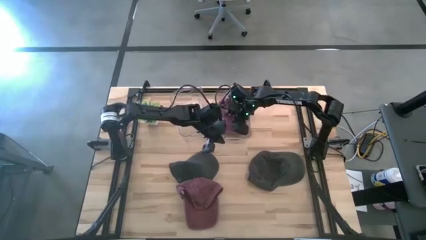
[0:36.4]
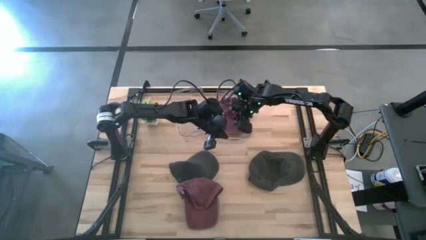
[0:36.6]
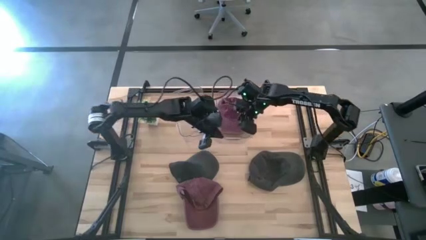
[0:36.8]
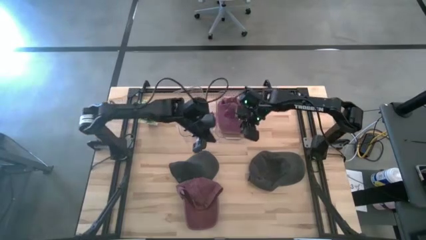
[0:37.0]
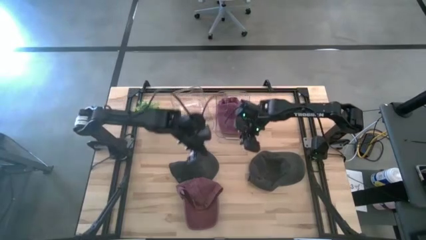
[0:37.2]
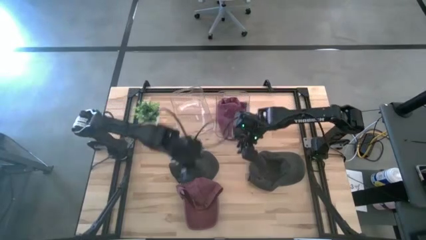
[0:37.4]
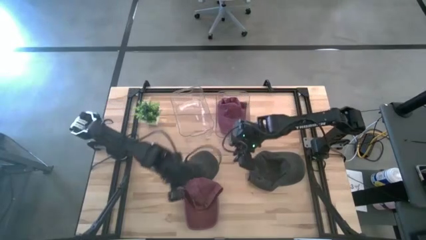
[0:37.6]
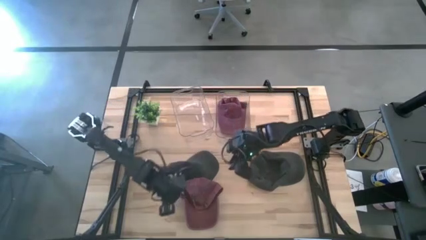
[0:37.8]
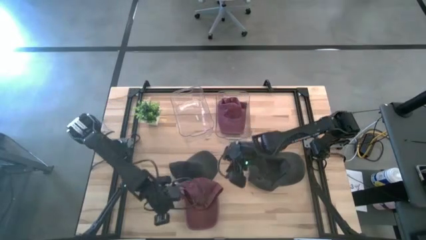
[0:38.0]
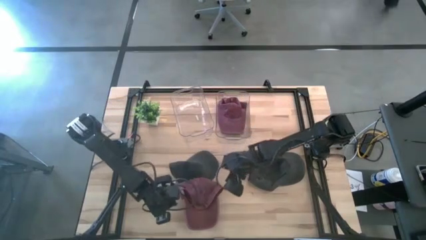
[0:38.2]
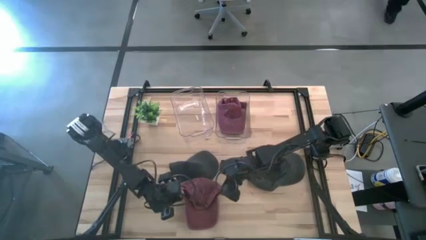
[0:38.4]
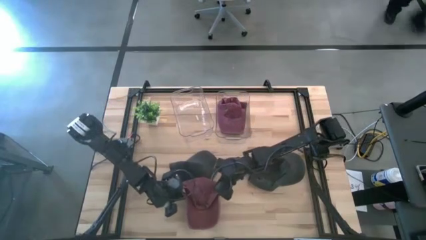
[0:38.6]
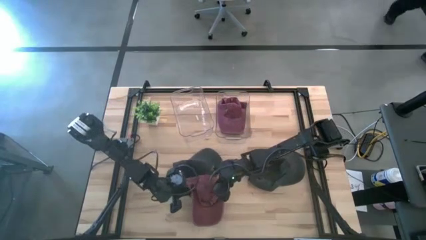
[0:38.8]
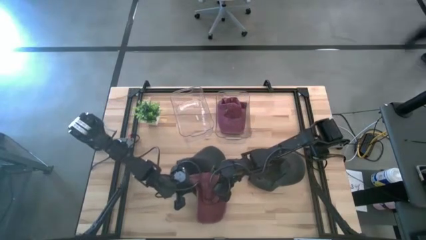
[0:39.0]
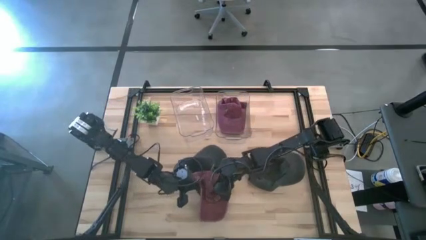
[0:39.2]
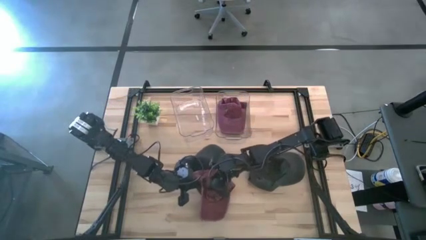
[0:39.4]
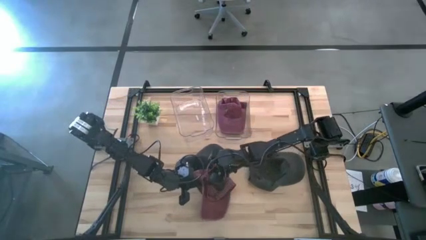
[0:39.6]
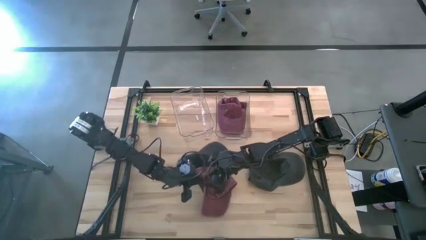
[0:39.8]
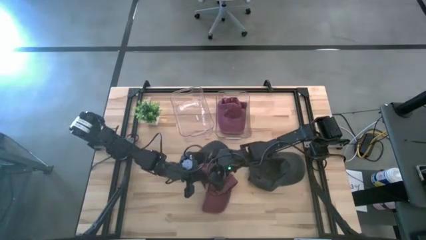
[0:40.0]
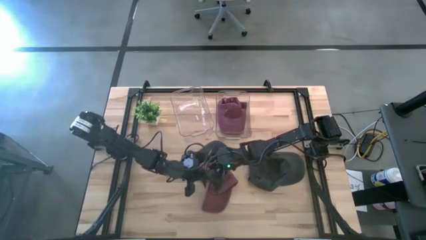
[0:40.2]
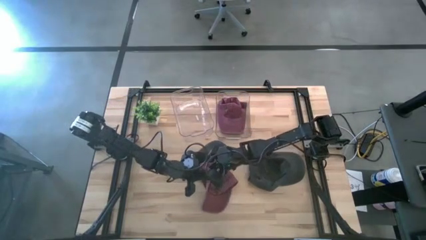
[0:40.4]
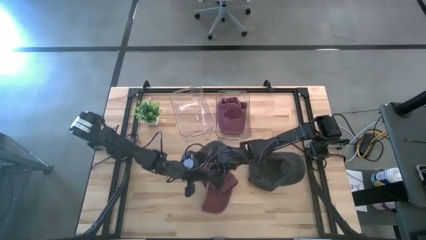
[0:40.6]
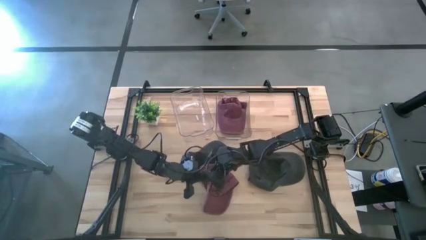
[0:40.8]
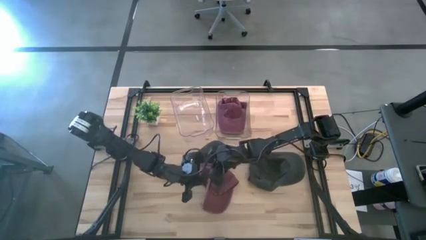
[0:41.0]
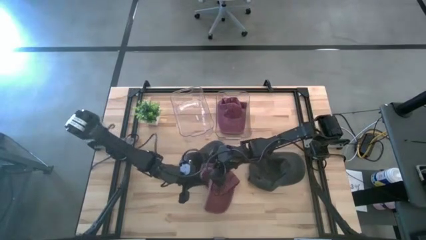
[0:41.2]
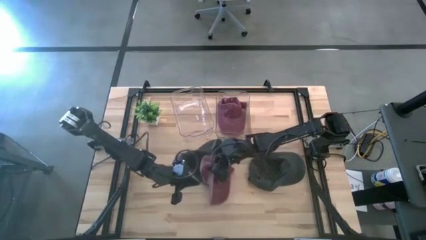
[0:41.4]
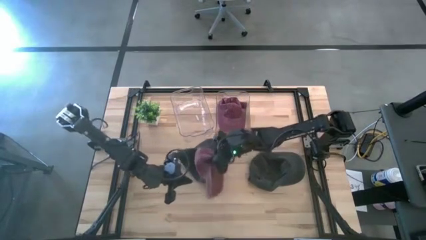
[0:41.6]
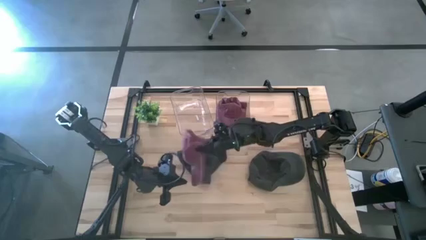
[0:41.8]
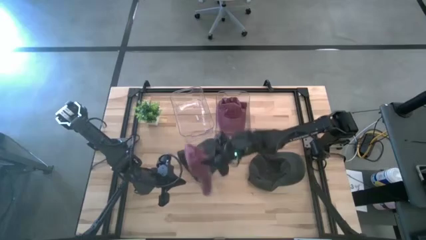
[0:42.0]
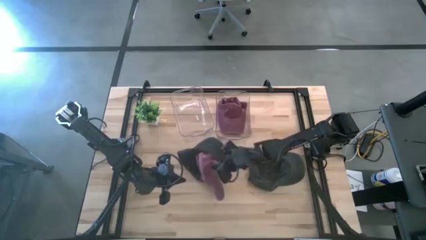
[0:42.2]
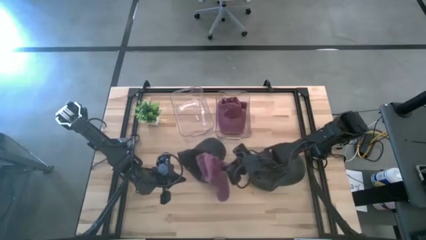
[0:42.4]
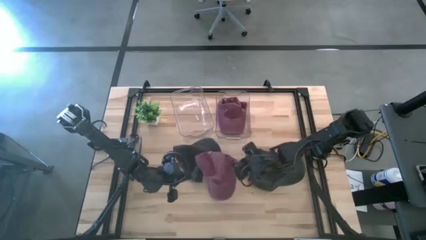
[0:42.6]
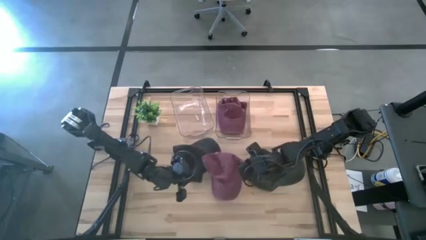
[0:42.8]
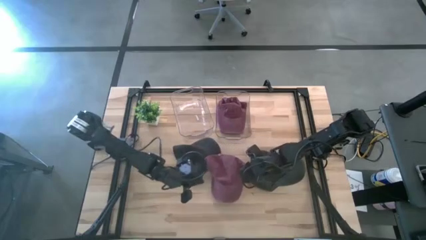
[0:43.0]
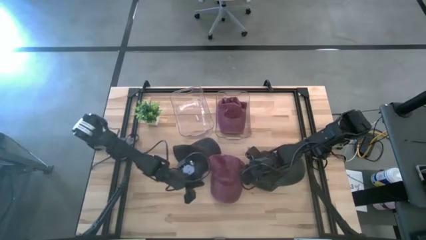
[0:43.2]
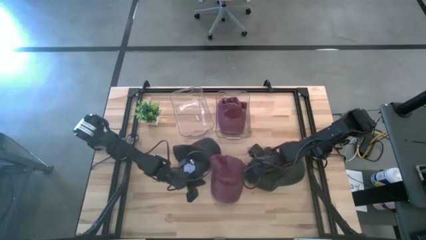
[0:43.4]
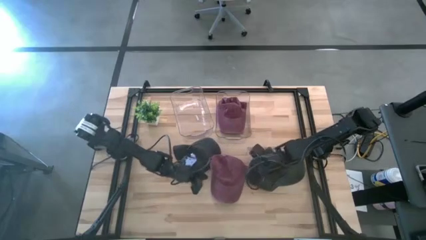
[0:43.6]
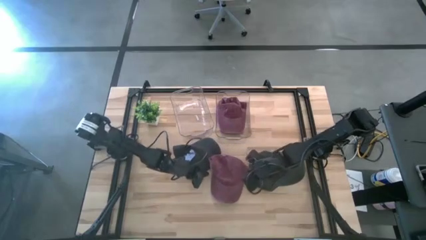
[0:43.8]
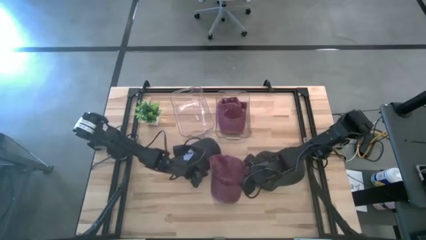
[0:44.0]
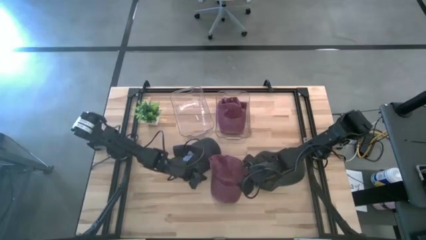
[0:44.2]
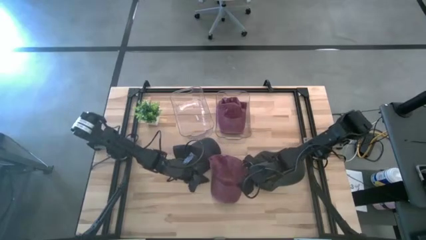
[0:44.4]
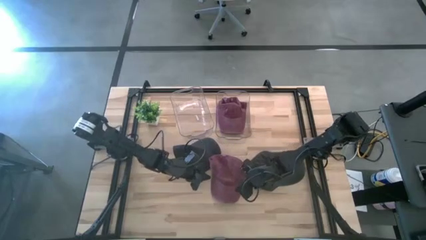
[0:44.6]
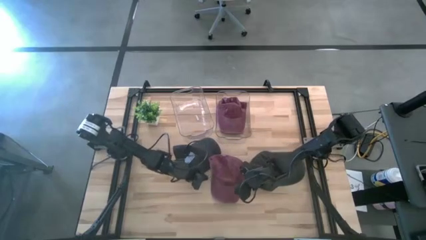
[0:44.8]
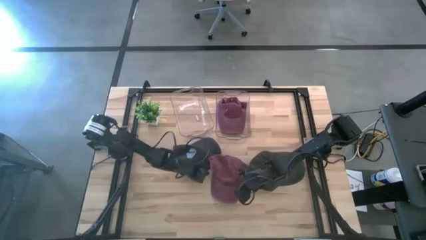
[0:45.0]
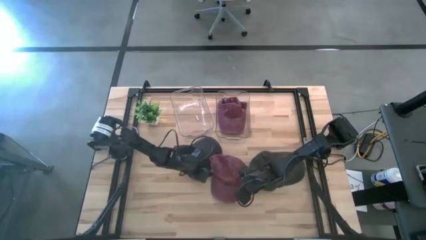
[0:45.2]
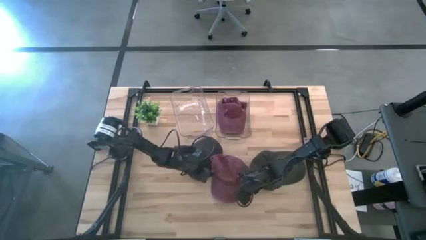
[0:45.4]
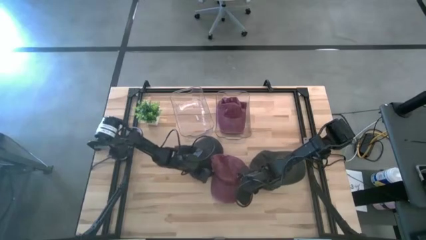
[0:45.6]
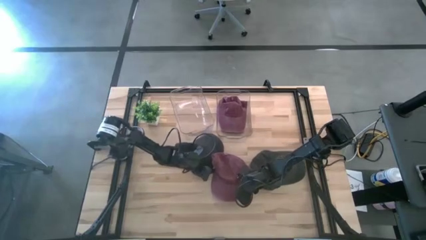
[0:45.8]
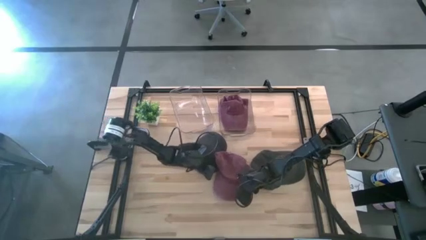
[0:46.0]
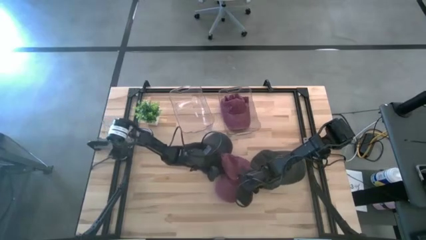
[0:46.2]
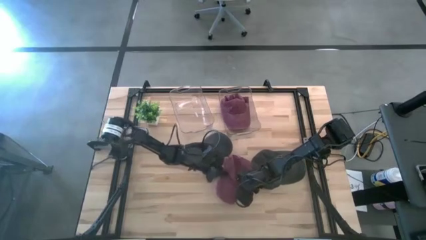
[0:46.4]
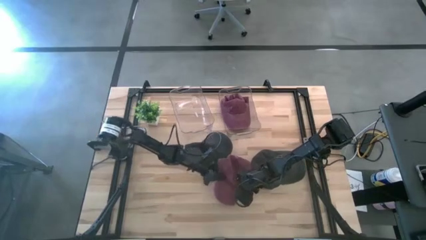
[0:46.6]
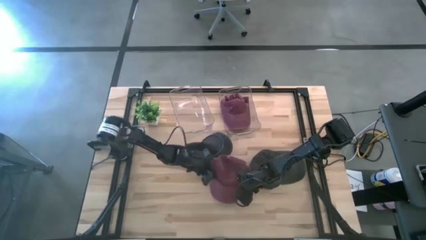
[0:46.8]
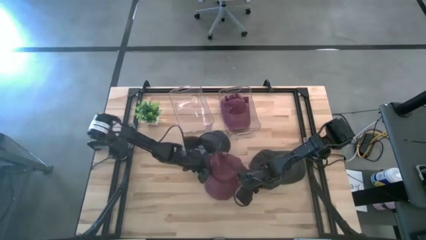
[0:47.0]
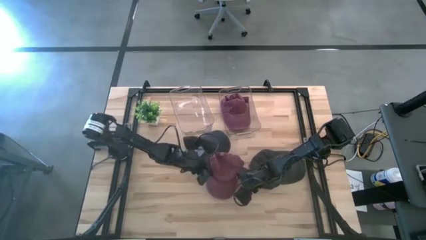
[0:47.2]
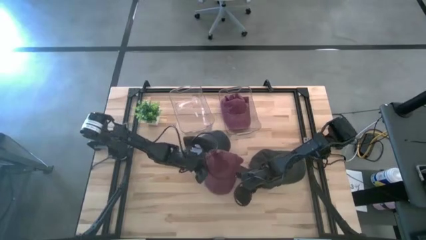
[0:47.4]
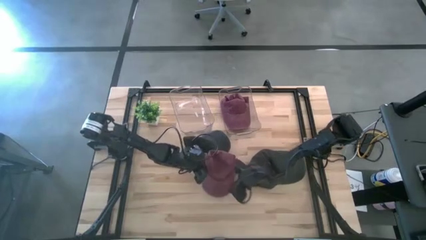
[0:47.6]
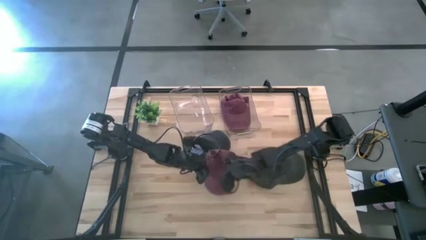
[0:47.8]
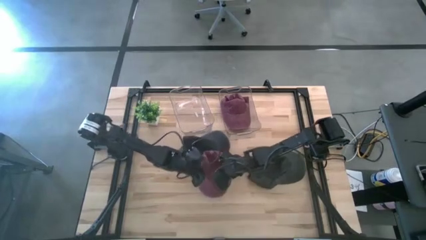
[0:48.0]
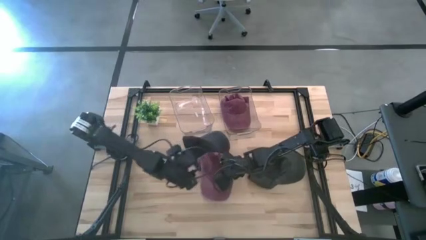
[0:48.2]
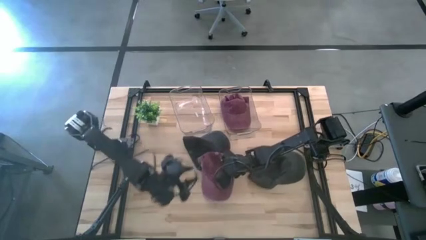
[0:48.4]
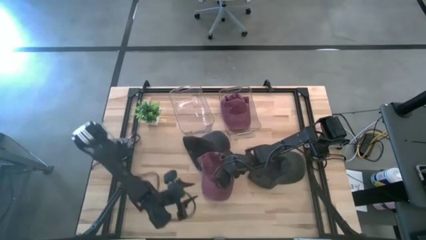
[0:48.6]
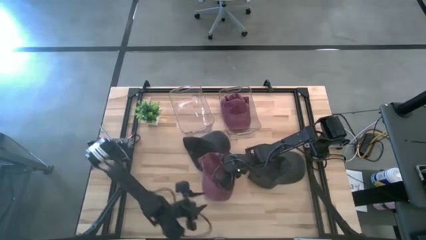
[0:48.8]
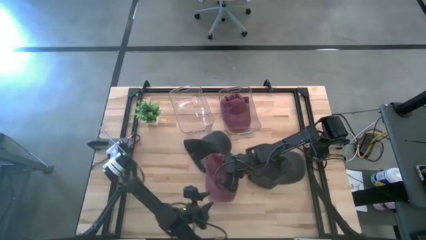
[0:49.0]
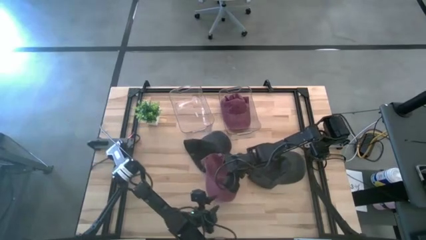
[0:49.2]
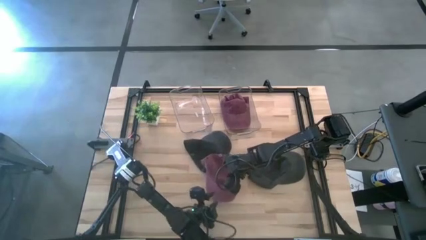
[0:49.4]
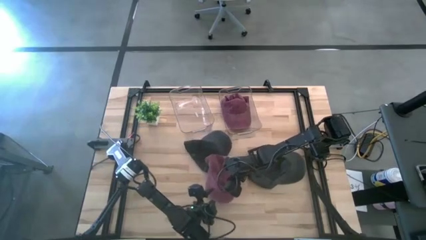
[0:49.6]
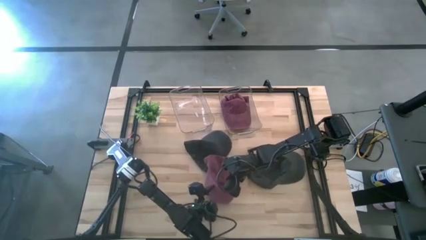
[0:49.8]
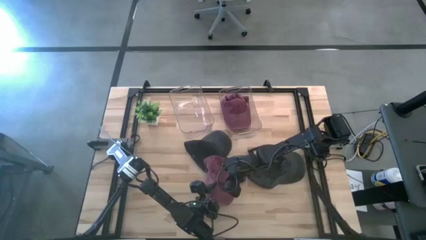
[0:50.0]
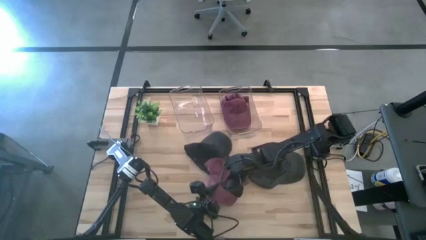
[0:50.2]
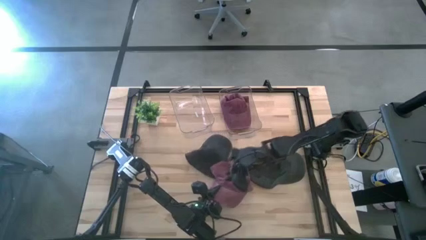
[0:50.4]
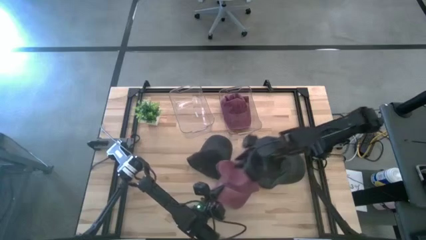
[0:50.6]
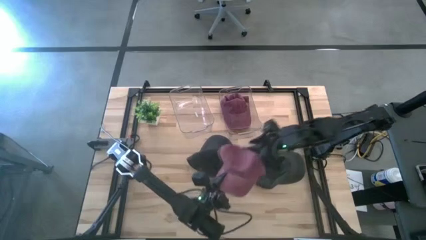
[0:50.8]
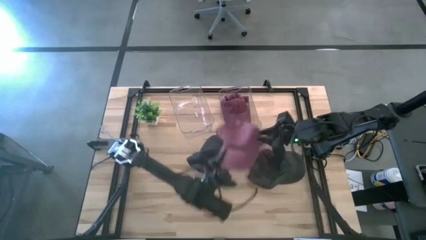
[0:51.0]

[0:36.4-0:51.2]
Task: Pick & Place hat
Put the red cap into the right transparent bin

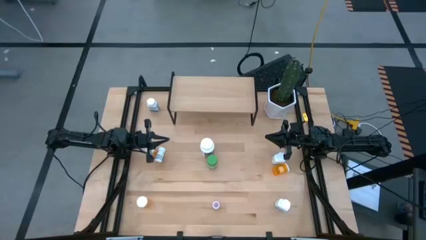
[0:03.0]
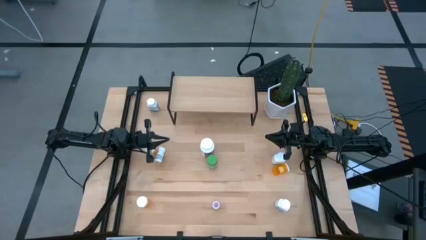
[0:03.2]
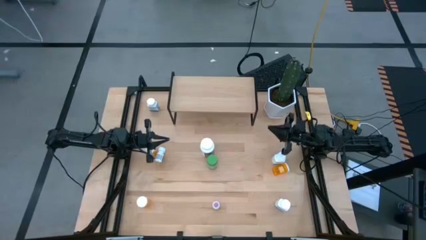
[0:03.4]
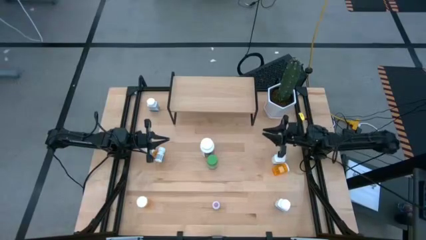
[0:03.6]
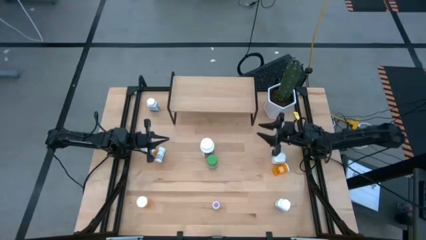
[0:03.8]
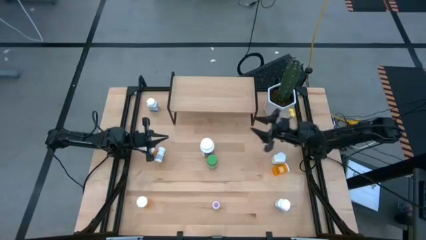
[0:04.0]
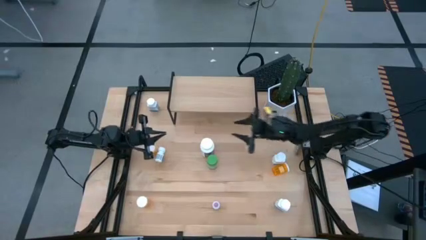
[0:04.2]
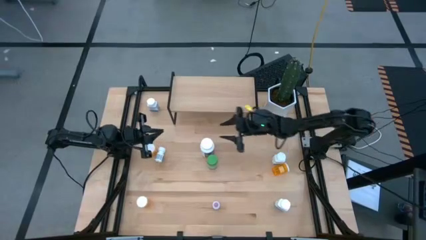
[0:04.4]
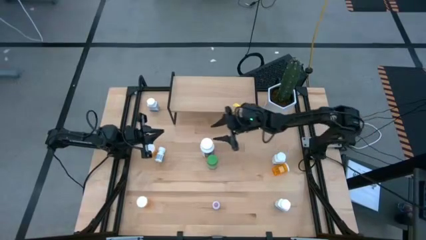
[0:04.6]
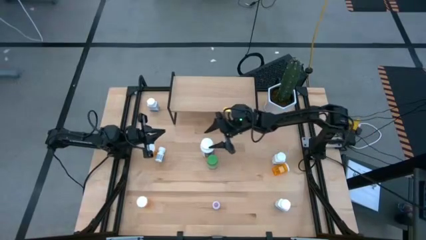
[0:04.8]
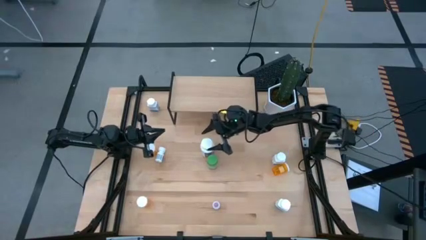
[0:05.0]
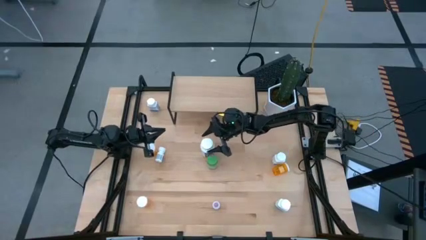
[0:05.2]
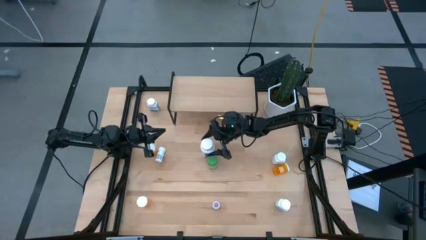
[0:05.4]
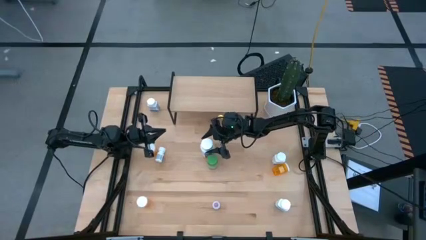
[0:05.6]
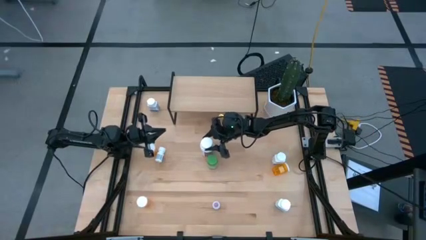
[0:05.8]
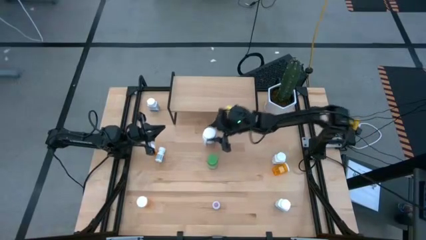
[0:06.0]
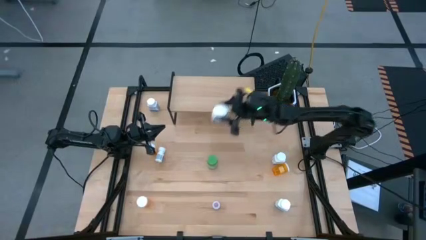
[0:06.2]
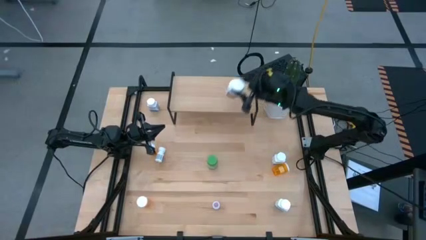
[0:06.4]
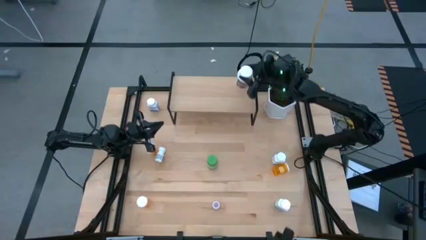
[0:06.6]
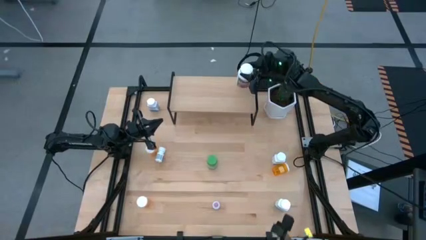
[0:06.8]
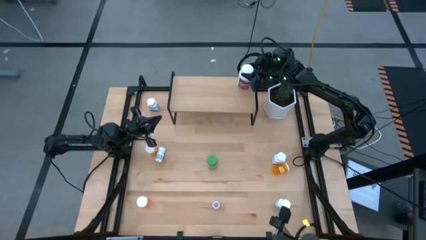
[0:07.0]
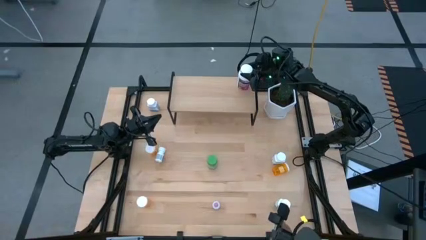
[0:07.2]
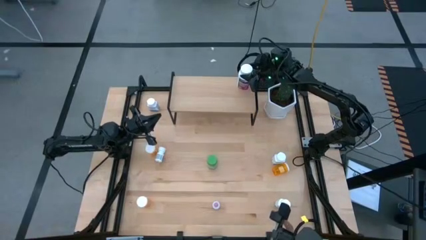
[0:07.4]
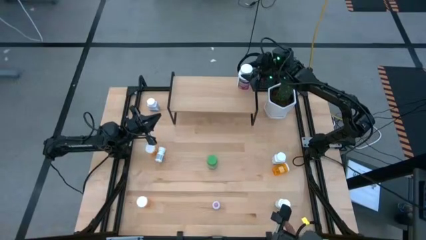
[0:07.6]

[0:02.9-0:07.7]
Task: Pick and place medicine bottles onto shelf by color
Put the white purple pill bottle on the shelf
